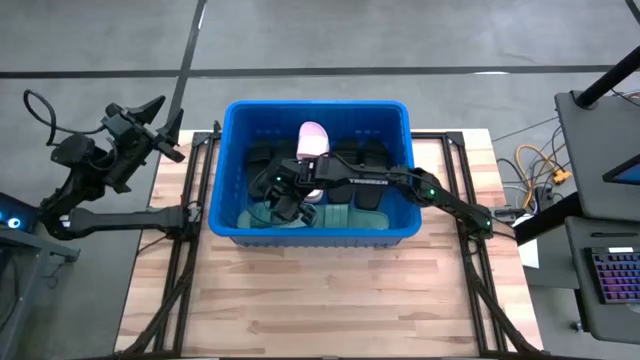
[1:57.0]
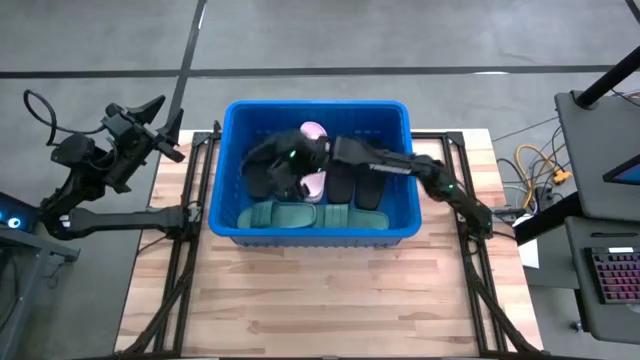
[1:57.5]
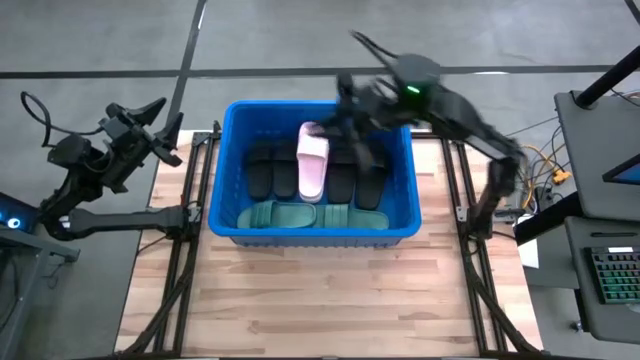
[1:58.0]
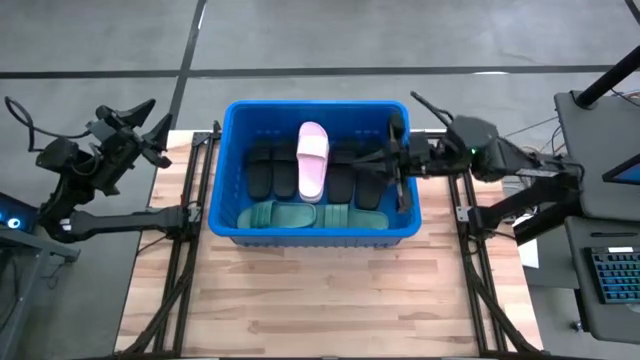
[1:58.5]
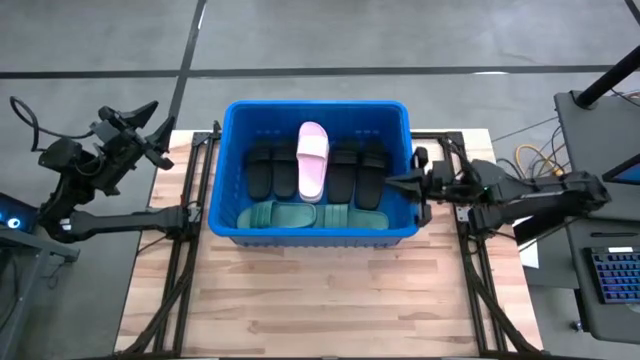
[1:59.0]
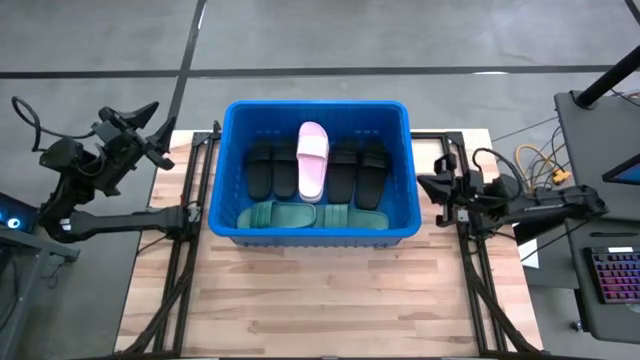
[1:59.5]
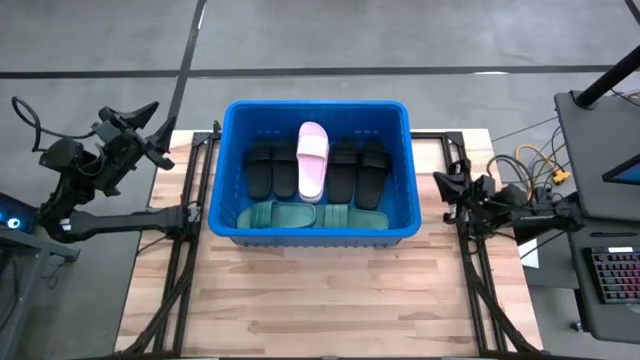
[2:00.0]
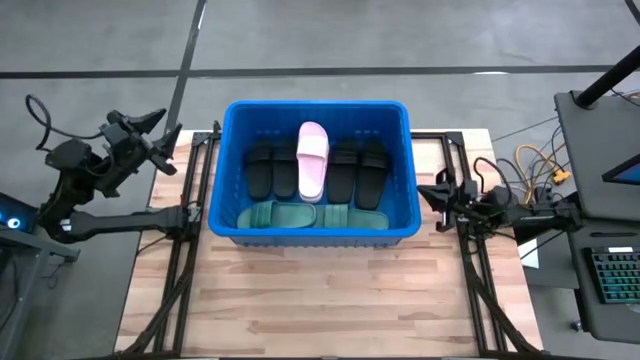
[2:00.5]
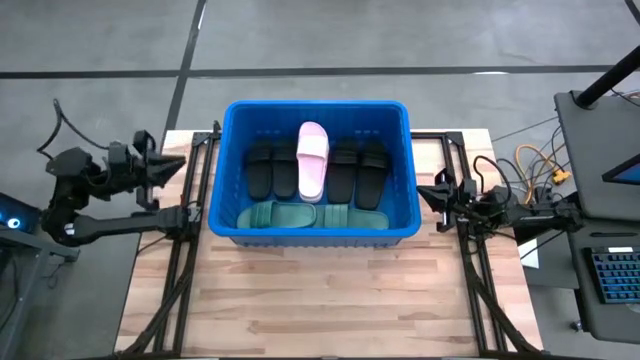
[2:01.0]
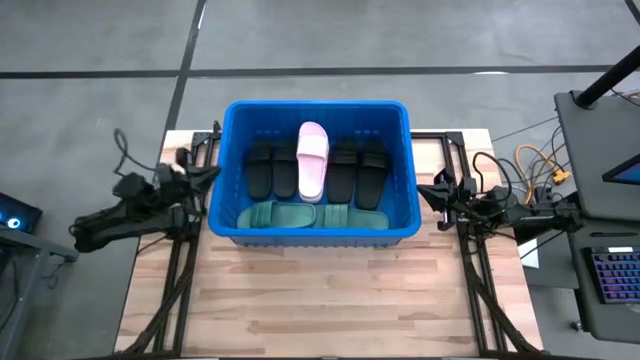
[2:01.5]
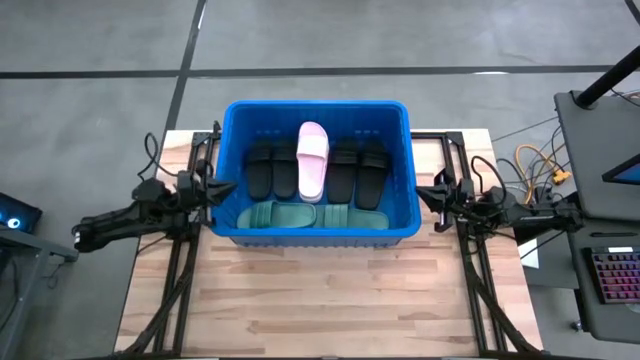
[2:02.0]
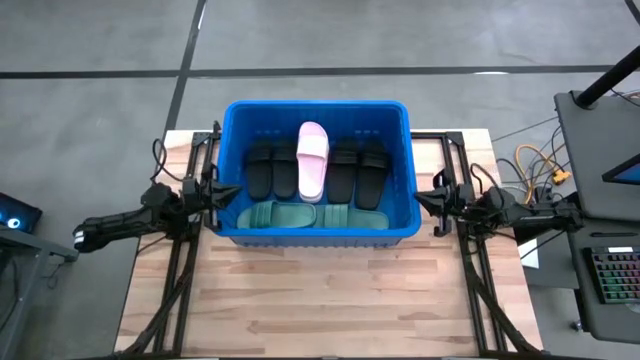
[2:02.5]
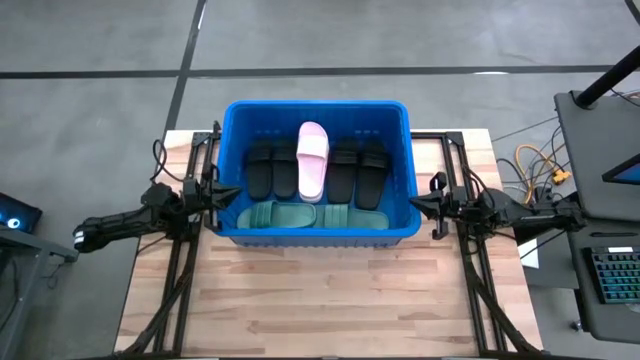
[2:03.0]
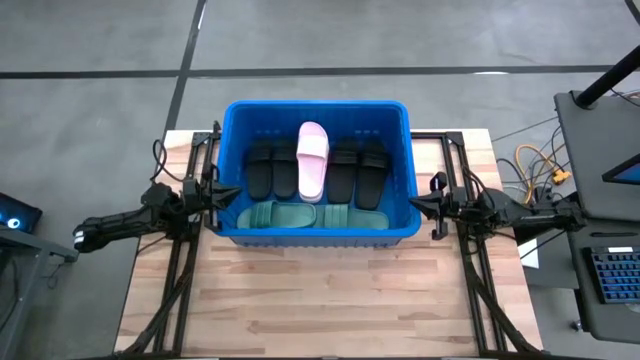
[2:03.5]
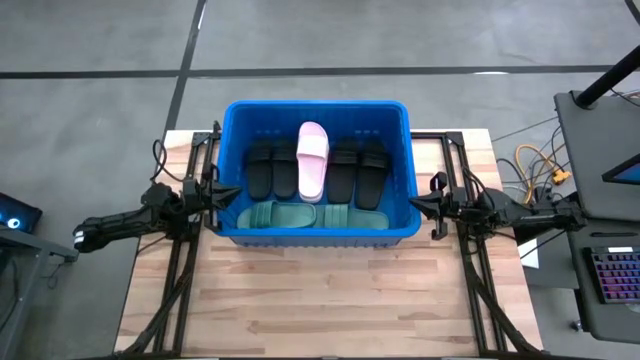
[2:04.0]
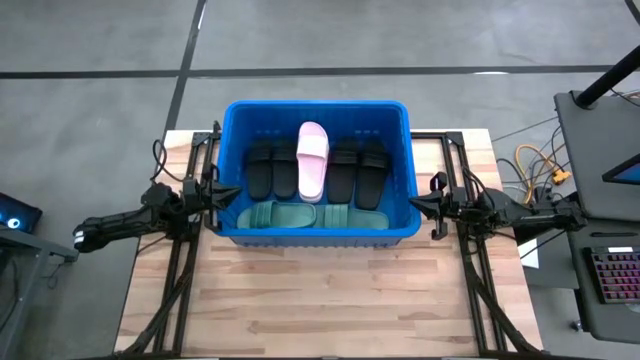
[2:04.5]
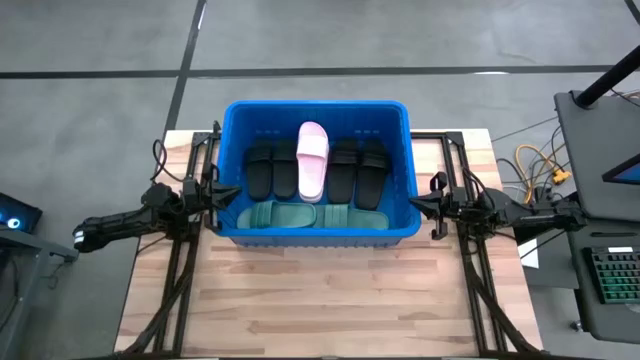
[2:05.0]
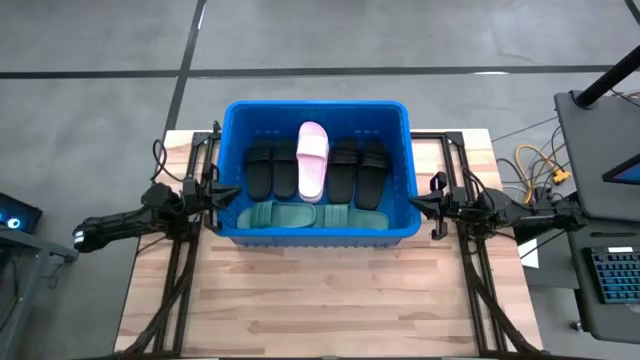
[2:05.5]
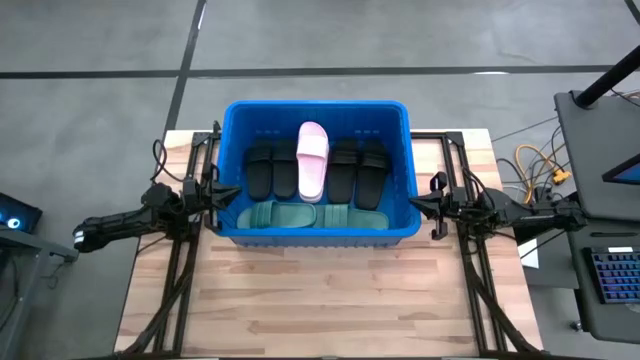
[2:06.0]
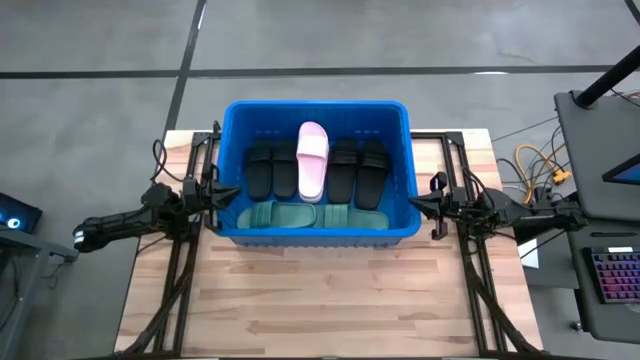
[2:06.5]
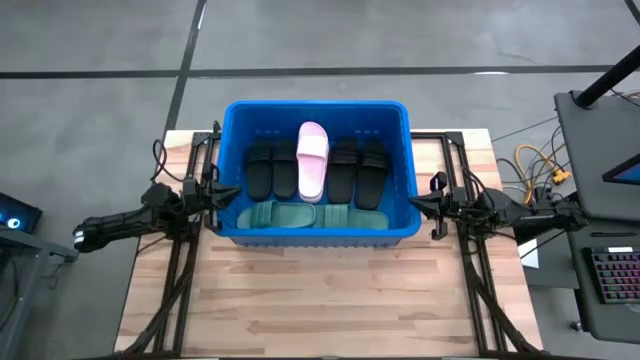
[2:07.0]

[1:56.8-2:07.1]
Task: Pick and place slides into bin
Return to Home Position

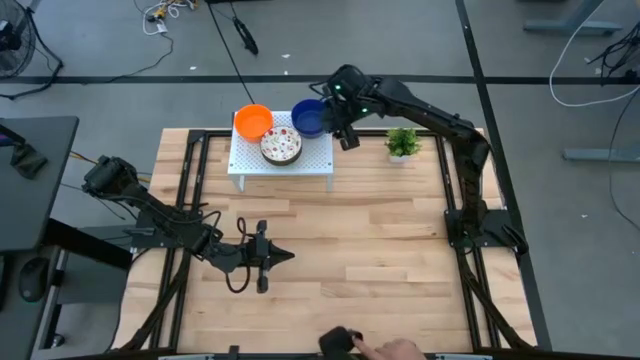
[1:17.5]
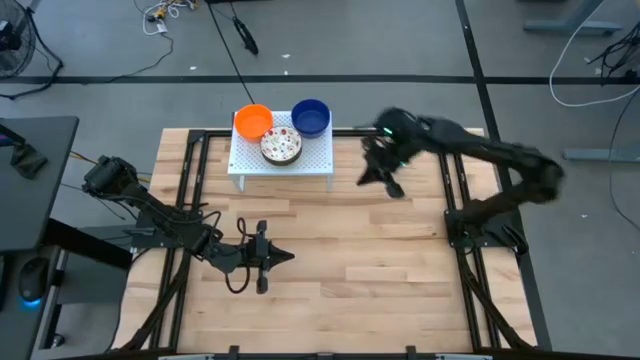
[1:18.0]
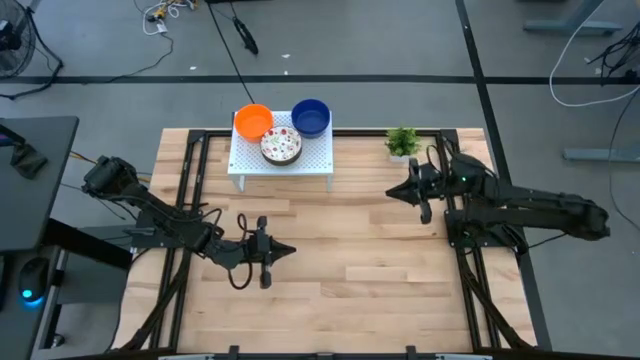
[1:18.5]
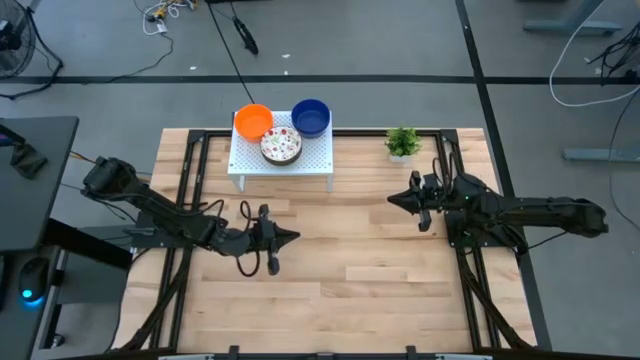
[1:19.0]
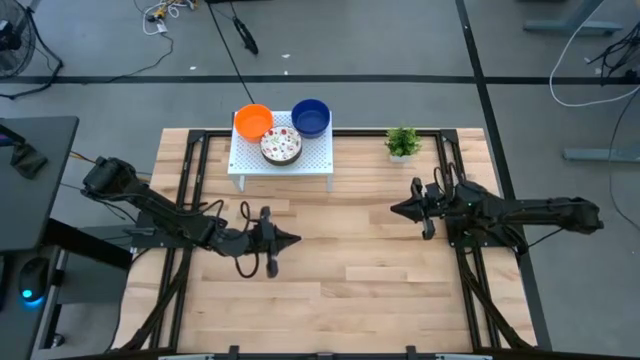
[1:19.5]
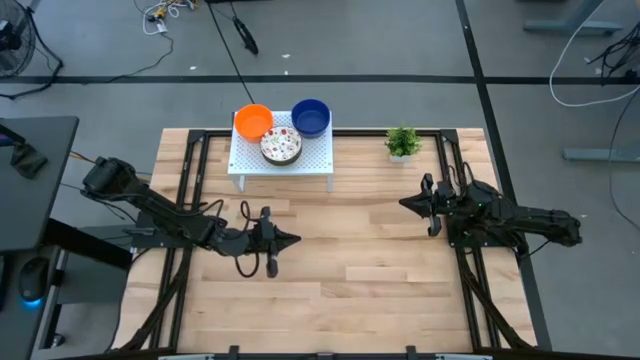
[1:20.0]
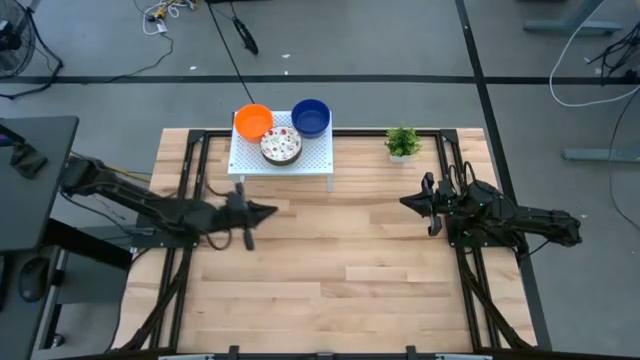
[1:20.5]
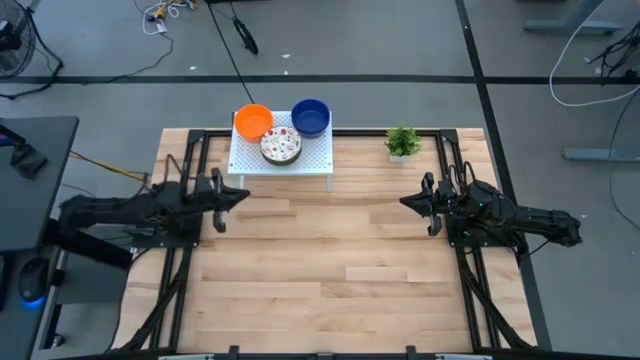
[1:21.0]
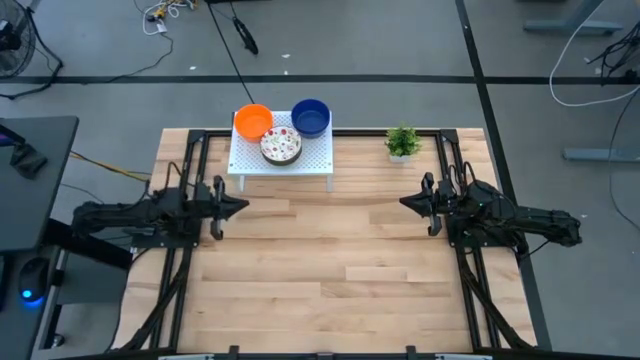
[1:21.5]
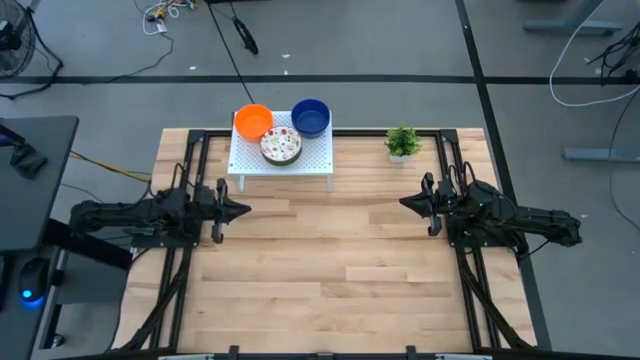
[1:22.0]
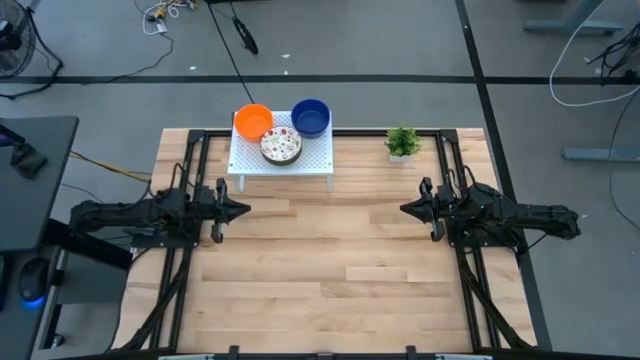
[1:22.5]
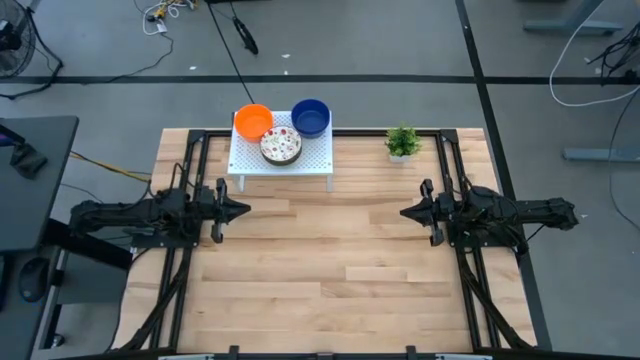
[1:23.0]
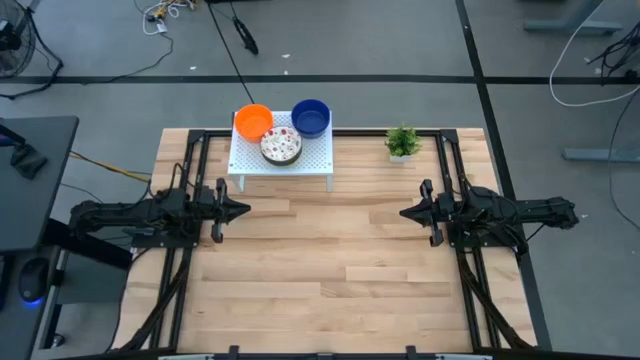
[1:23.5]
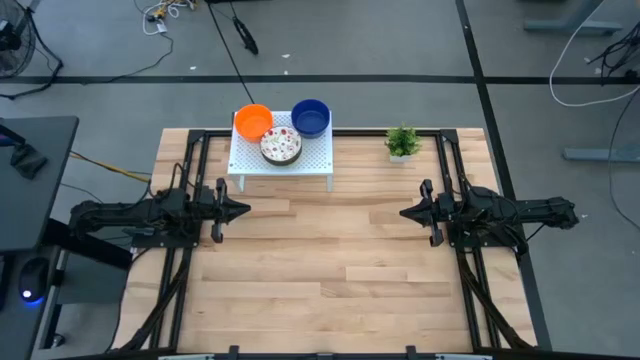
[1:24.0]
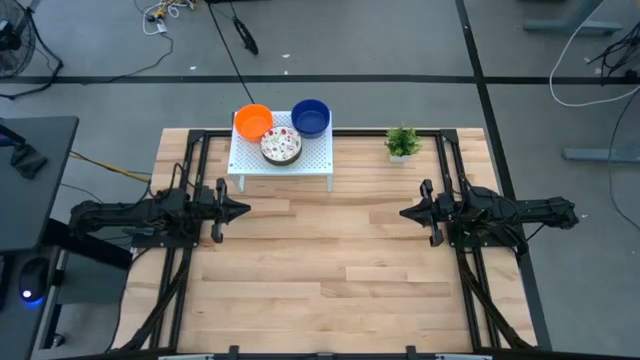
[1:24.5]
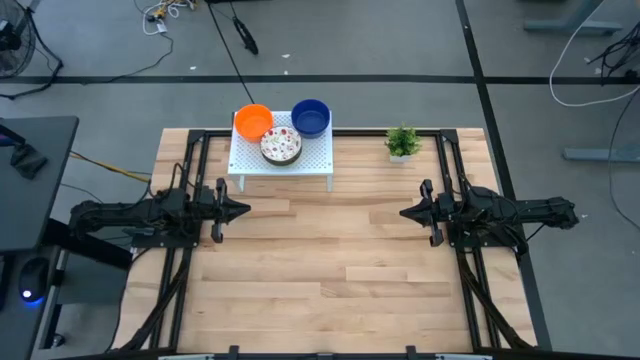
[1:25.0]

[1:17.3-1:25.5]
Task: Pick & Place Mini bowls
Return to Home Position
